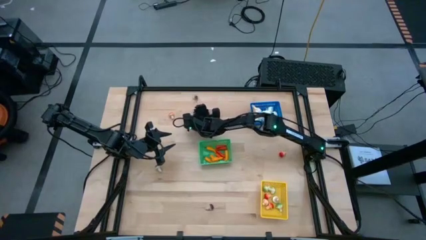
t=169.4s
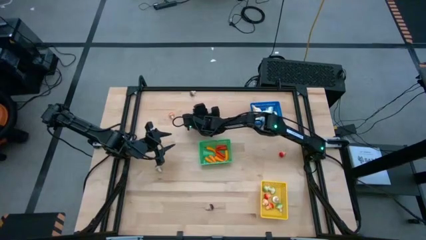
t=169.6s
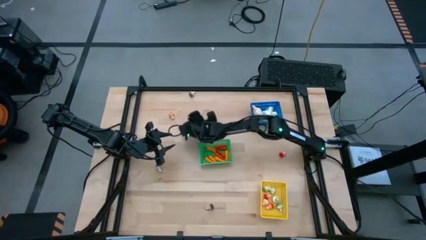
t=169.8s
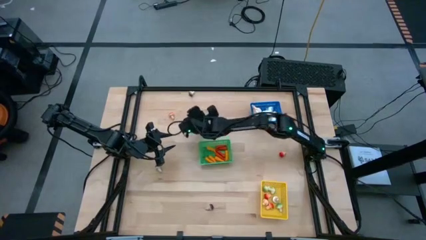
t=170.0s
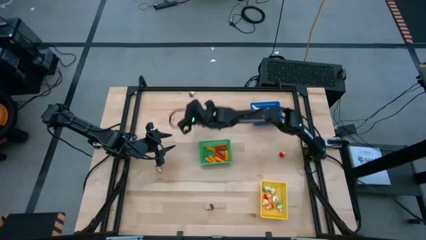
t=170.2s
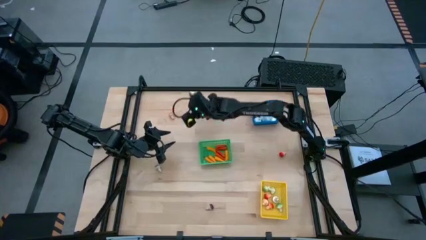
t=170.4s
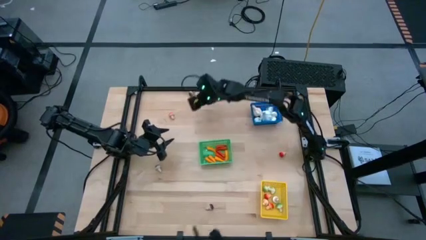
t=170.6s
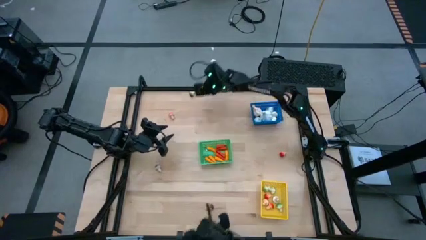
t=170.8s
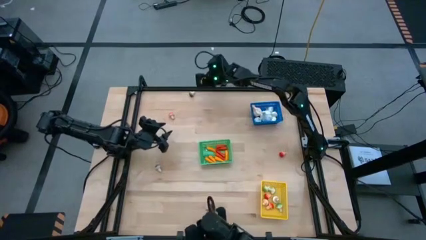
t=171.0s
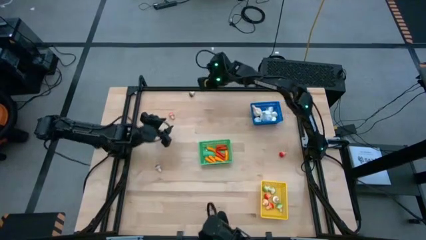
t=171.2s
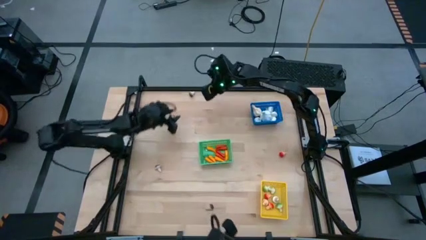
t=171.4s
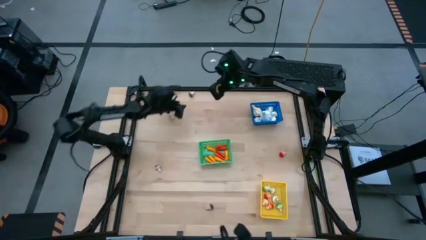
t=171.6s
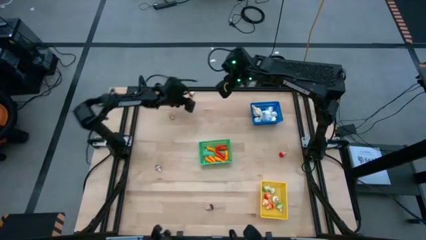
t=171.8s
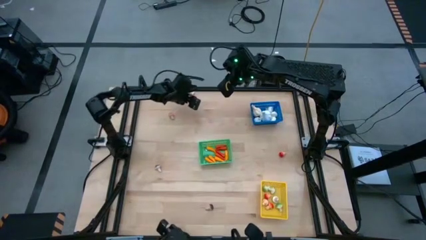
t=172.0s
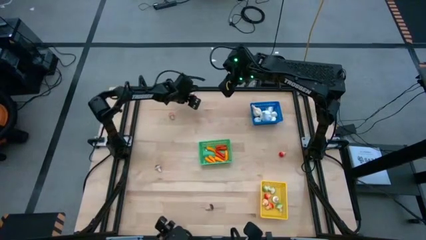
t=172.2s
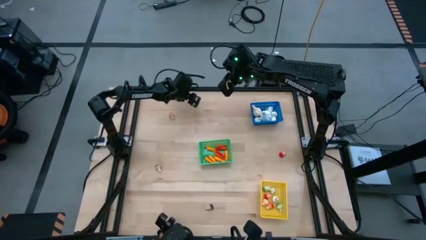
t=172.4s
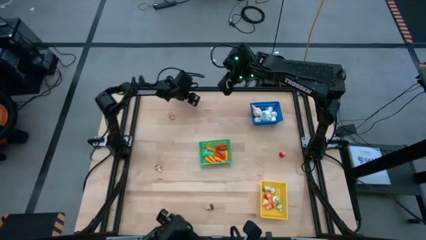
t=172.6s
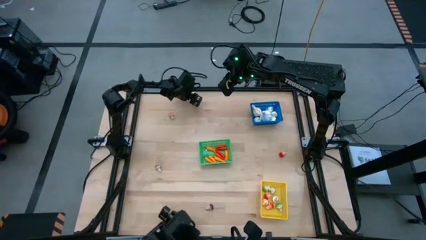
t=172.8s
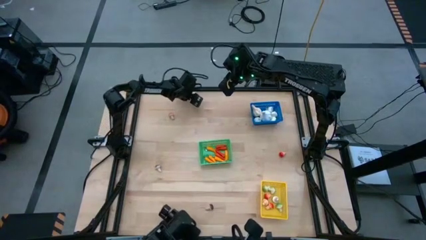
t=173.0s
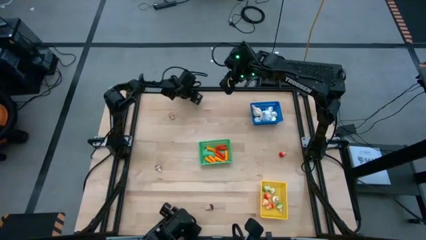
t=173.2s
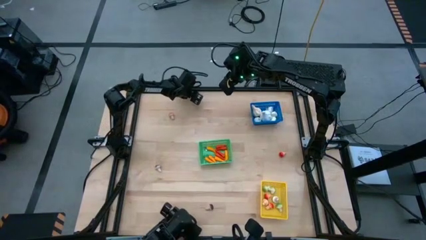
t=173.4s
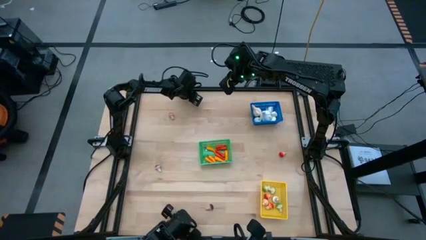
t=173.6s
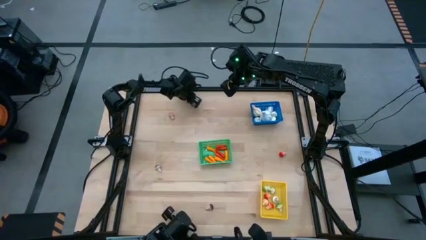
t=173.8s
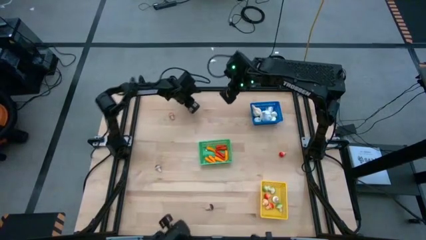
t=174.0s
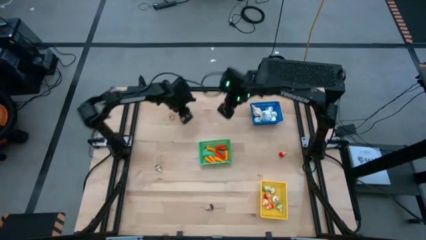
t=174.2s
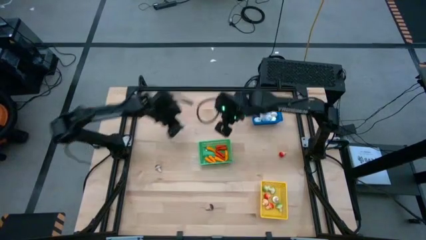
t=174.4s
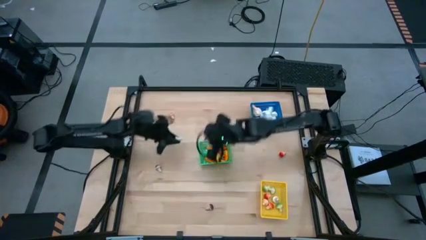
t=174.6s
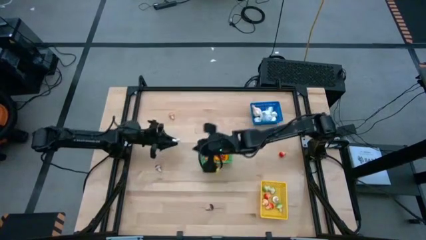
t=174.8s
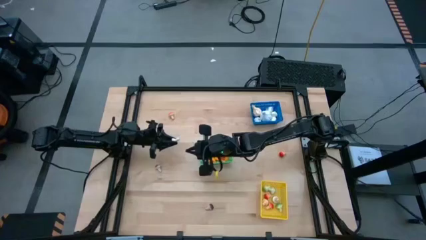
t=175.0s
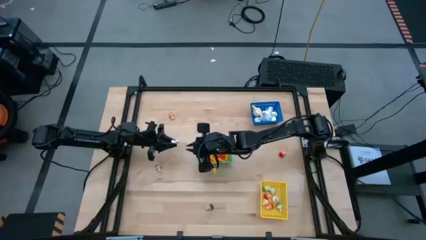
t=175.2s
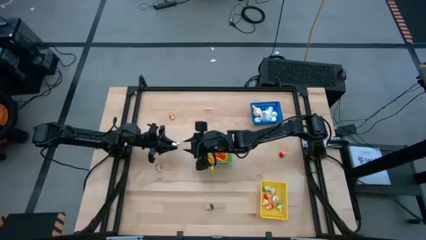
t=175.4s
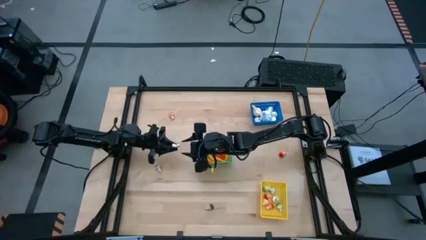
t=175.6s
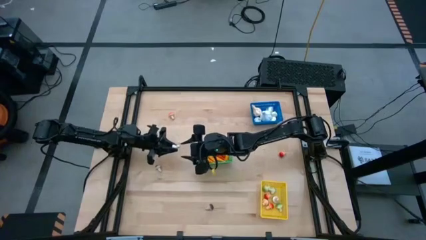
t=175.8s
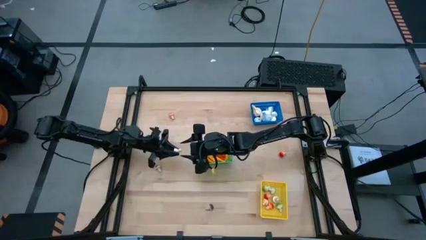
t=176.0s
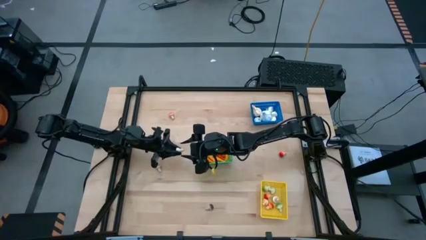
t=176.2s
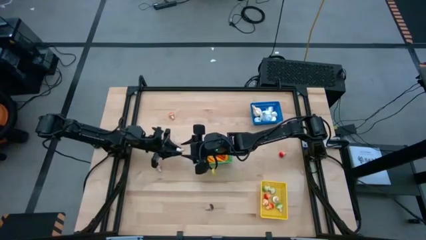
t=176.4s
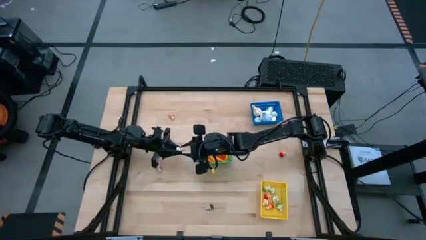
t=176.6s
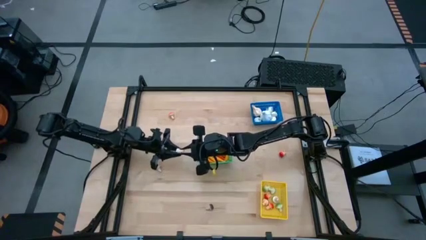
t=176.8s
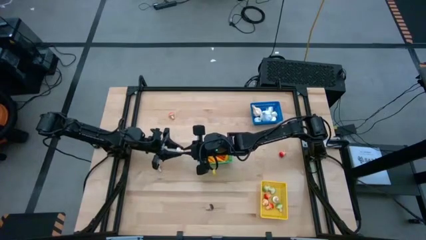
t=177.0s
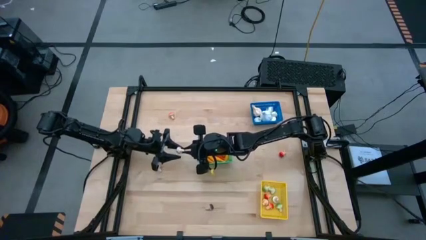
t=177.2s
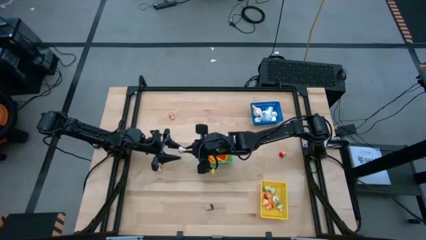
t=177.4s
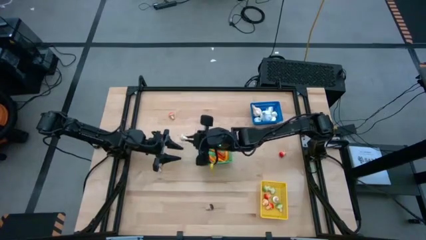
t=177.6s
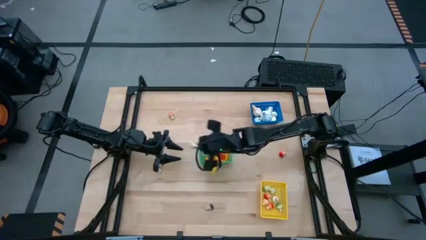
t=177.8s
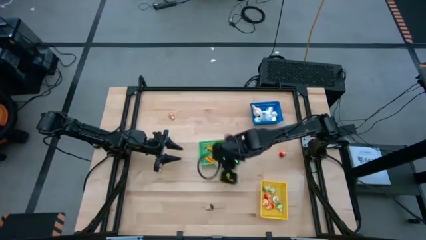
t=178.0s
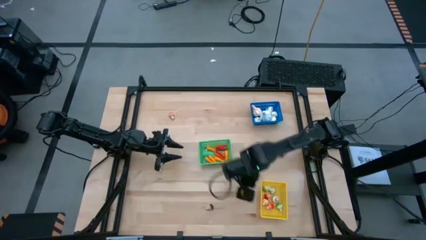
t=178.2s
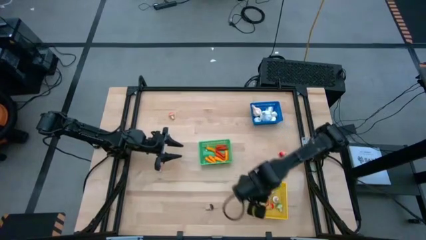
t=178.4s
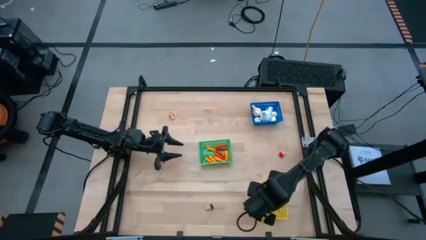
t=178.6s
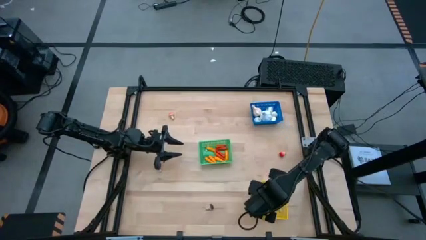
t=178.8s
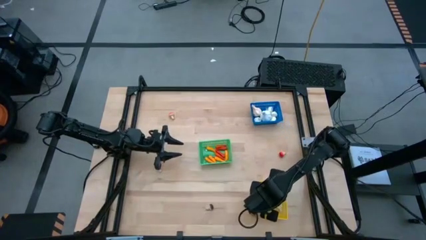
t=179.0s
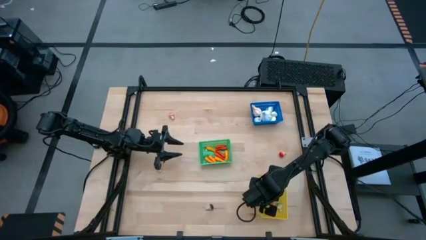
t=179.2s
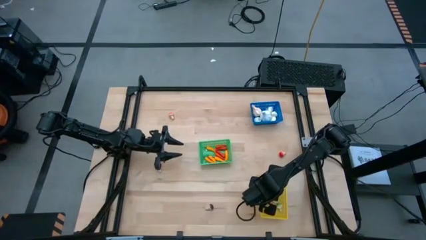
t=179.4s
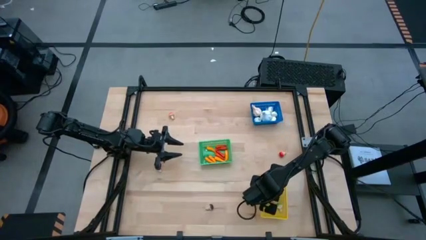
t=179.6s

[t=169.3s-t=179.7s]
Task: Sort produce into baskets
Put the brown mushroom into the yellow bin

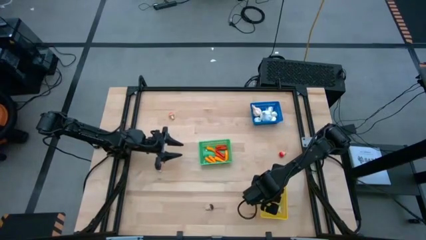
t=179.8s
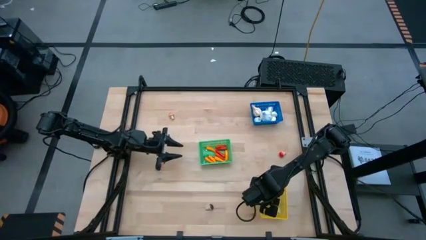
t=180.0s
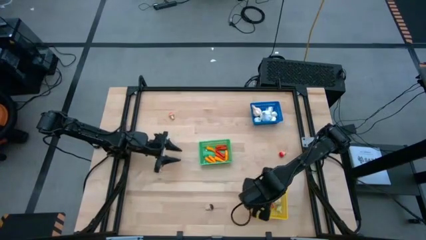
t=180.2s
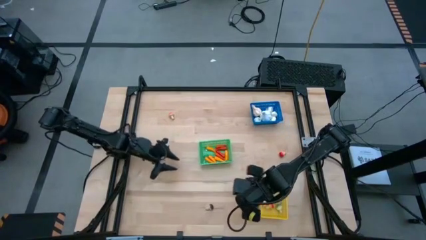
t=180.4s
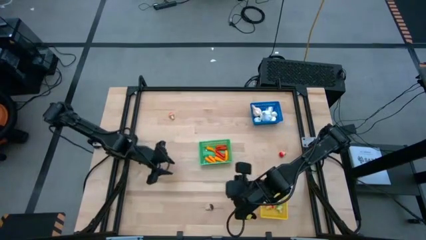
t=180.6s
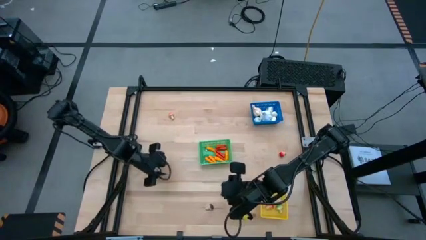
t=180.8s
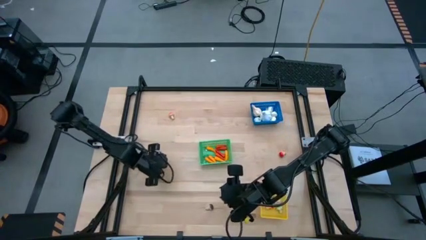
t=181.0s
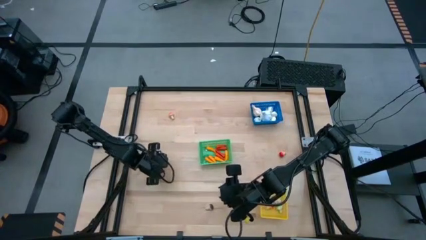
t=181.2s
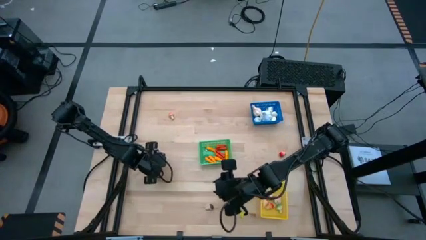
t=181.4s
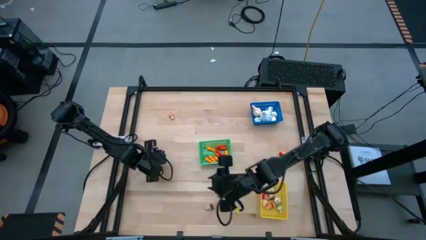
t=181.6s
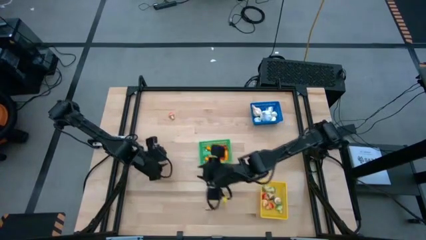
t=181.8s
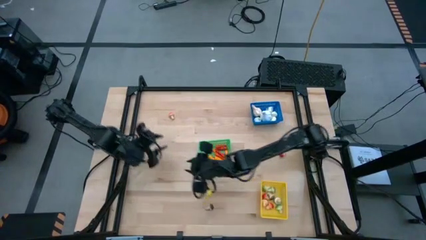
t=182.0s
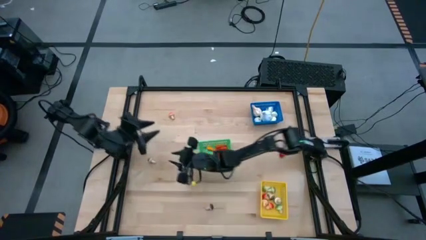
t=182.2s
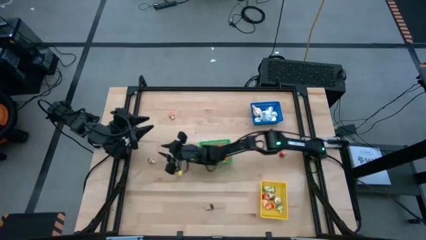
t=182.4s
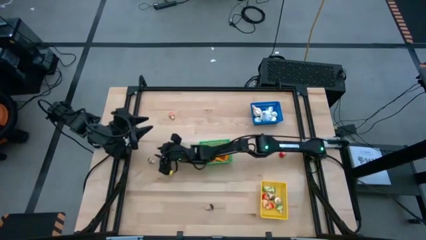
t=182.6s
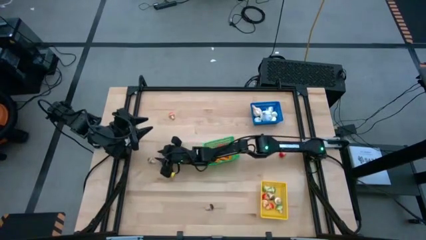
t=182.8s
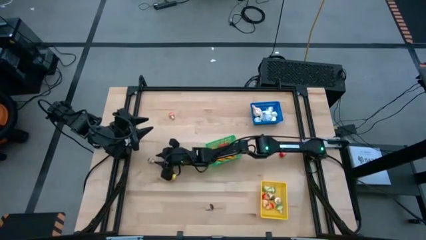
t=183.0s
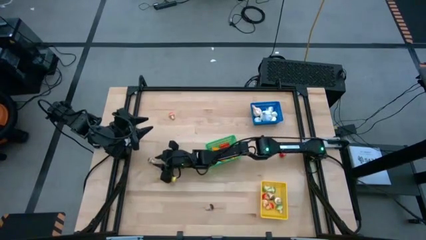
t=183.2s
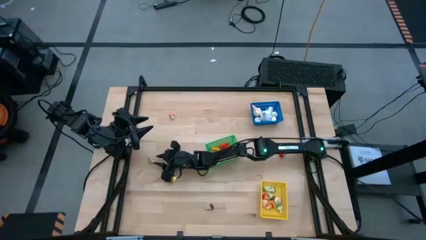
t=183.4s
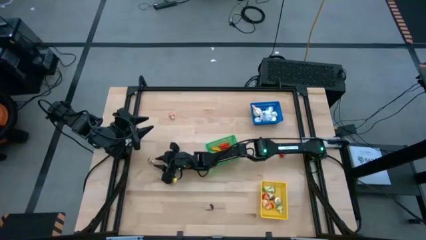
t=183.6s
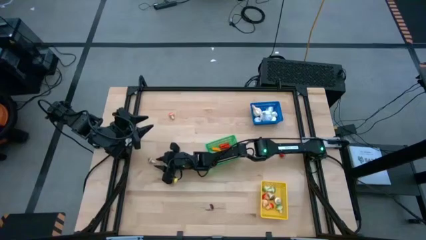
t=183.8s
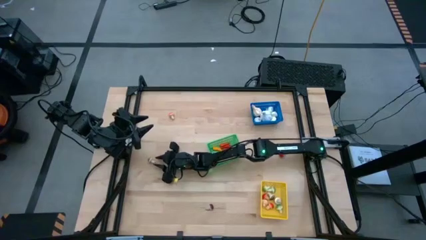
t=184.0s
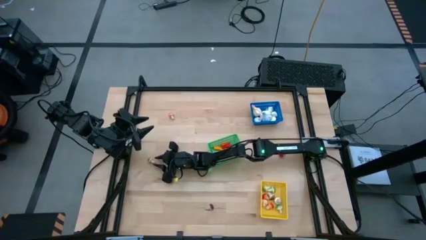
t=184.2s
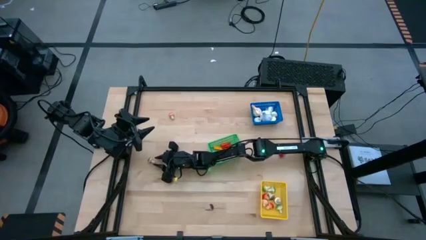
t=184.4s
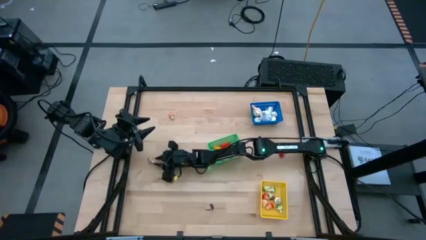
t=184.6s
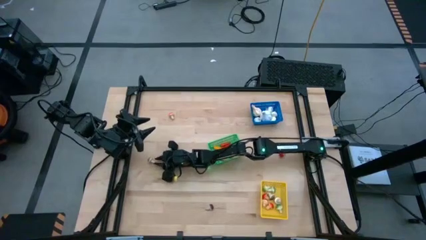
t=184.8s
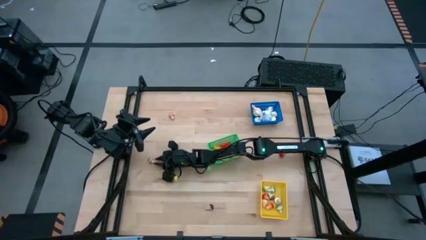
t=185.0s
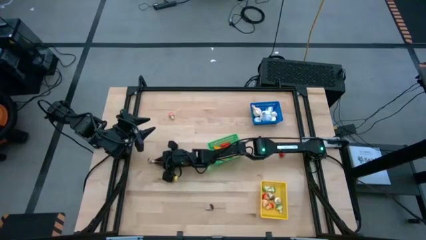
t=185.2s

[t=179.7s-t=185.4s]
Put the brown mushroom into the yellow bin
